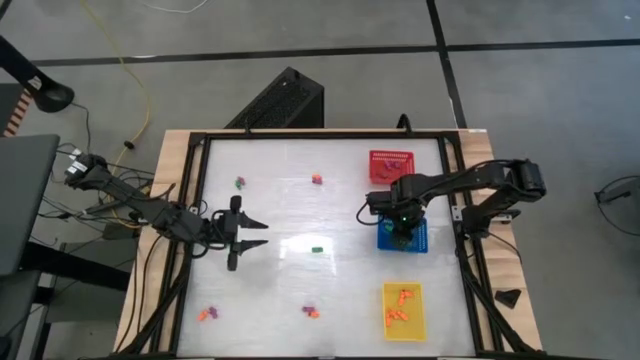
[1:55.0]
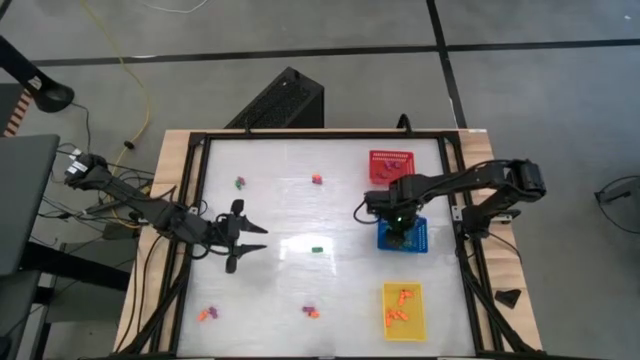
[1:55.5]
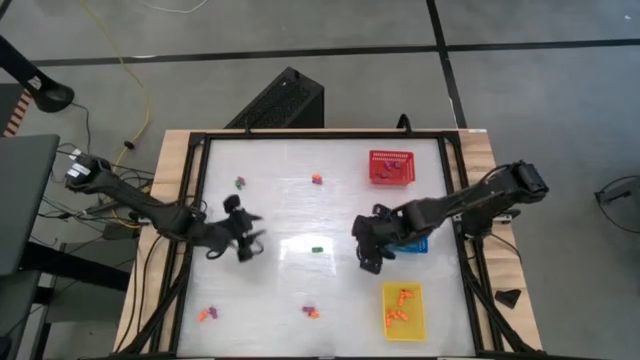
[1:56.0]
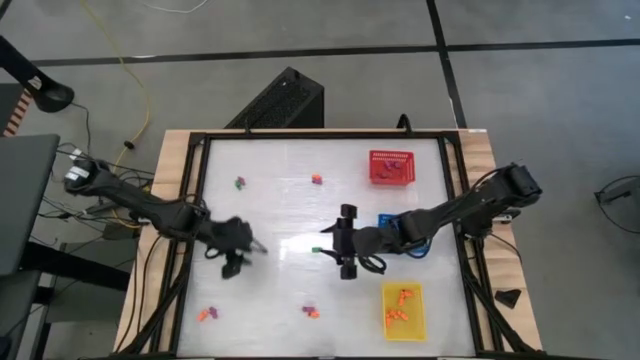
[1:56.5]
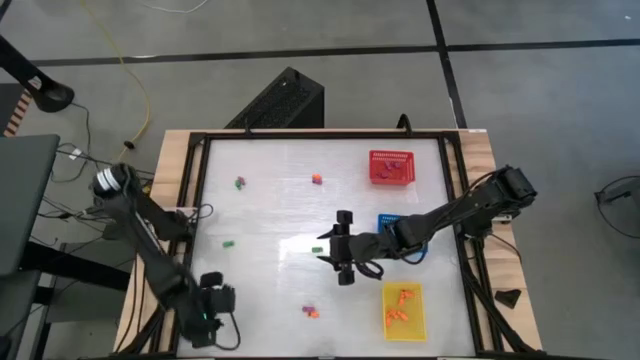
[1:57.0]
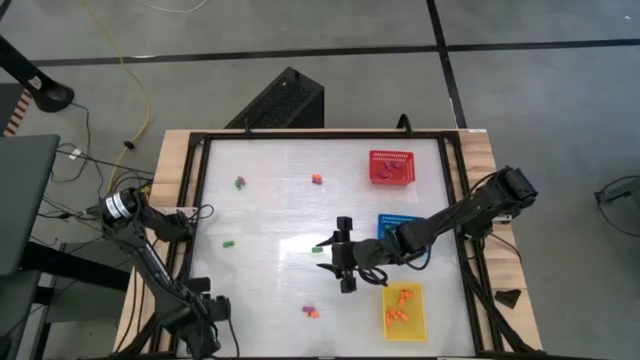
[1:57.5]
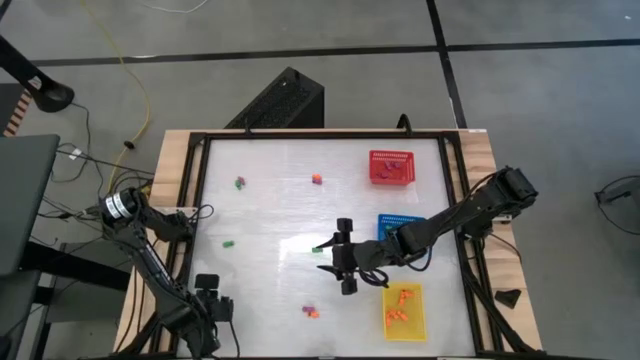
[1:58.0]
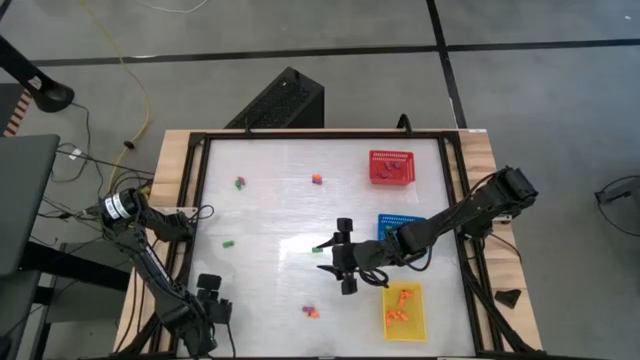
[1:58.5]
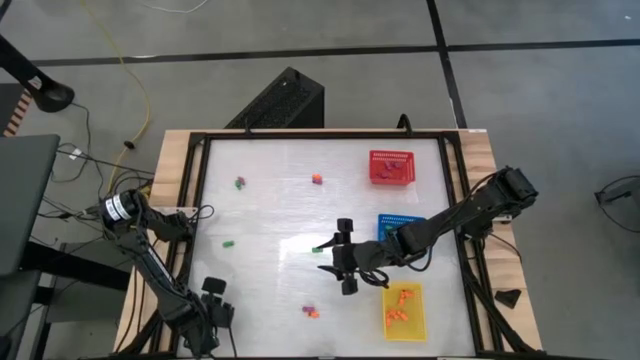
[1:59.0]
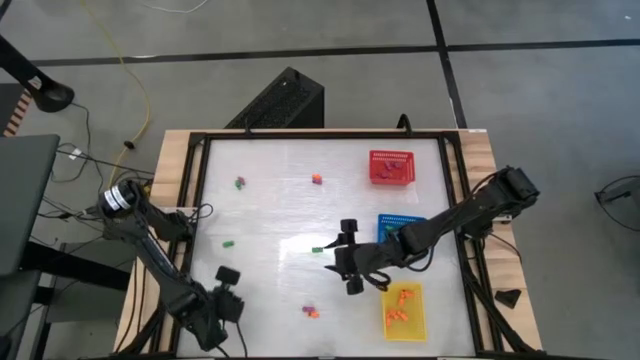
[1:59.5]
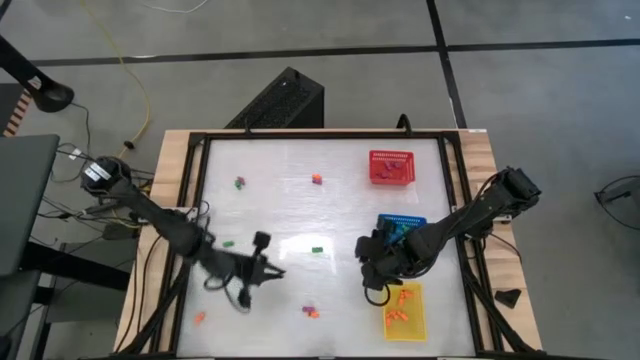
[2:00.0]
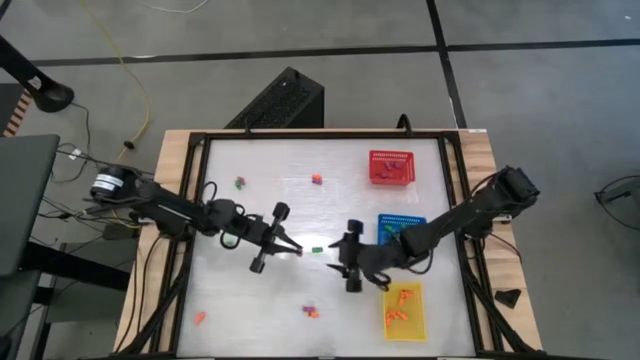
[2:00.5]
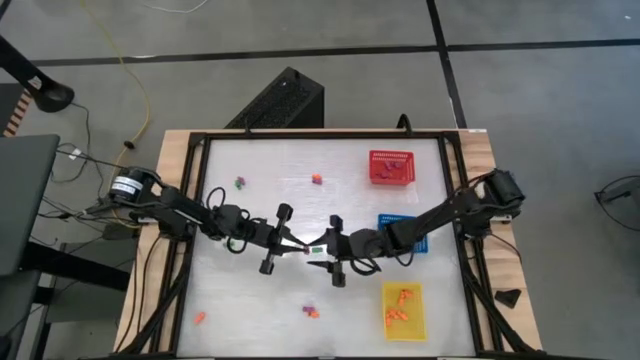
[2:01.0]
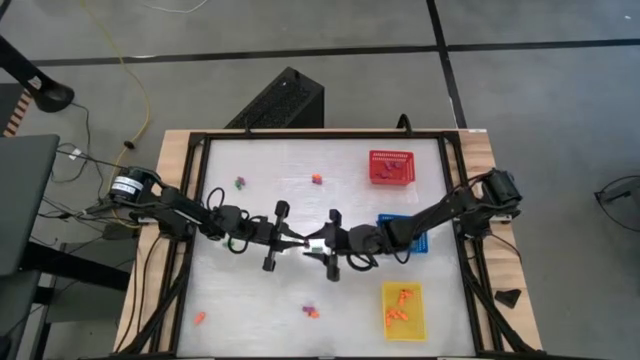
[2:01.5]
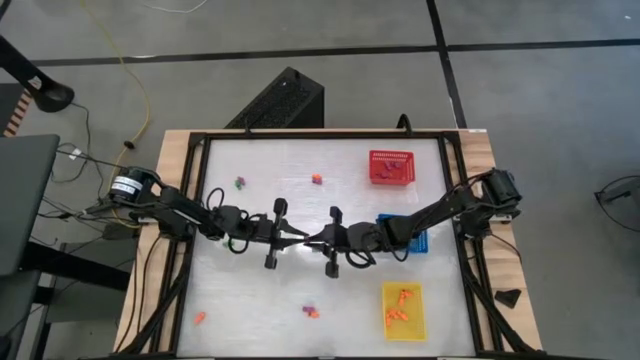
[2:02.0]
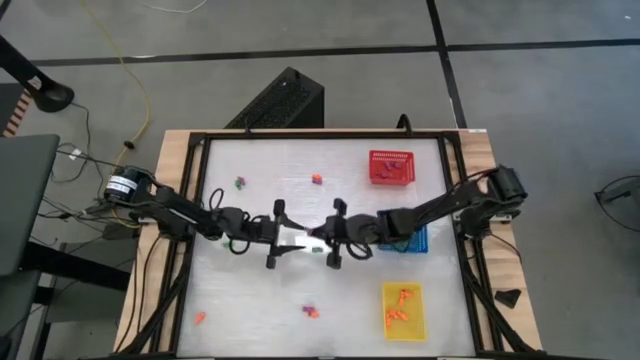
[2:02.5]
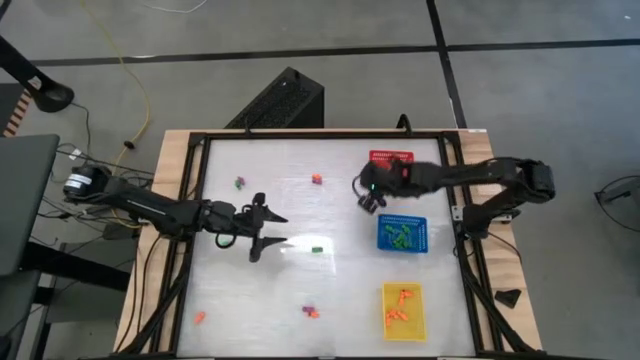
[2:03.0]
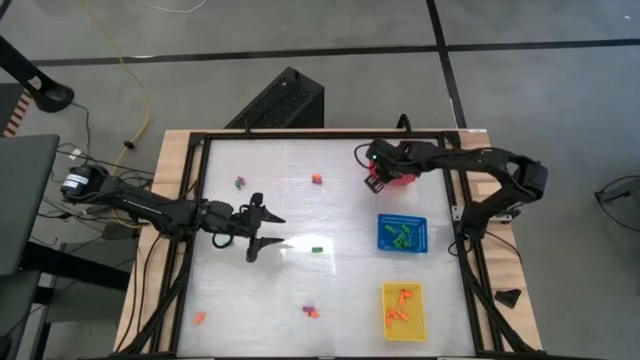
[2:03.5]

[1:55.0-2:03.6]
Task: Sort Halloween decoration
Put the violet skeleton toy into the red basket

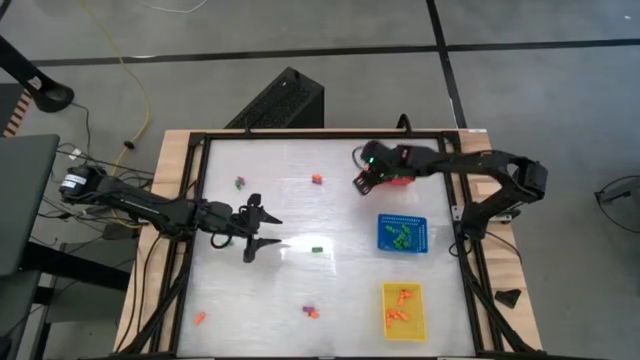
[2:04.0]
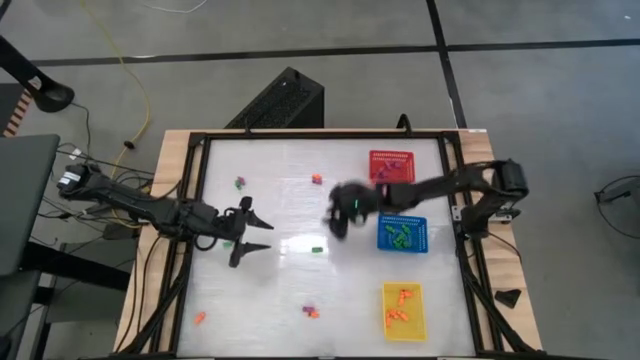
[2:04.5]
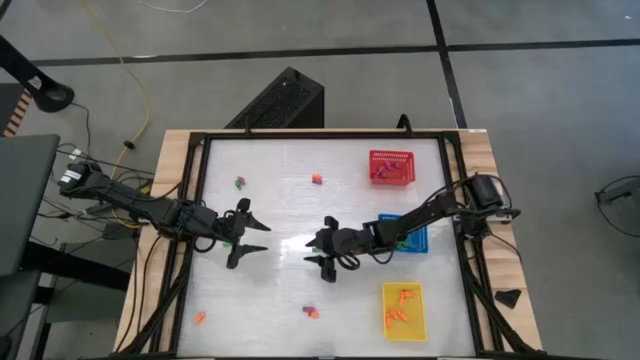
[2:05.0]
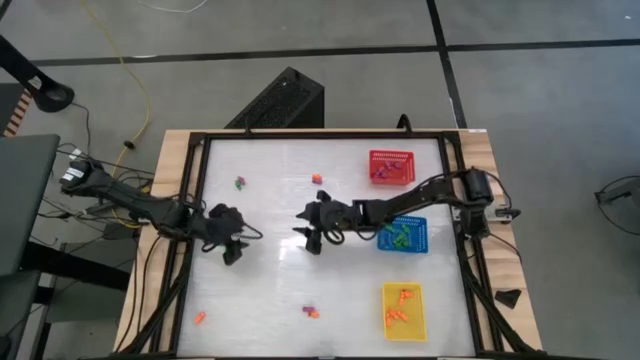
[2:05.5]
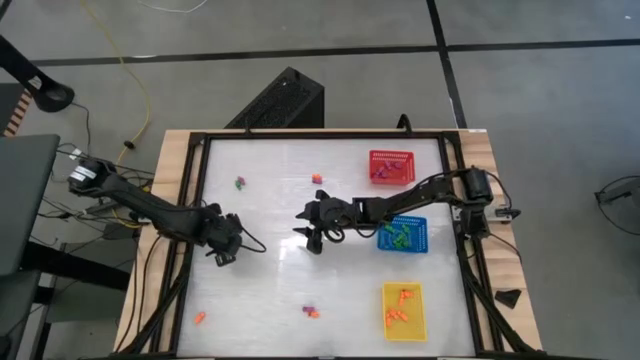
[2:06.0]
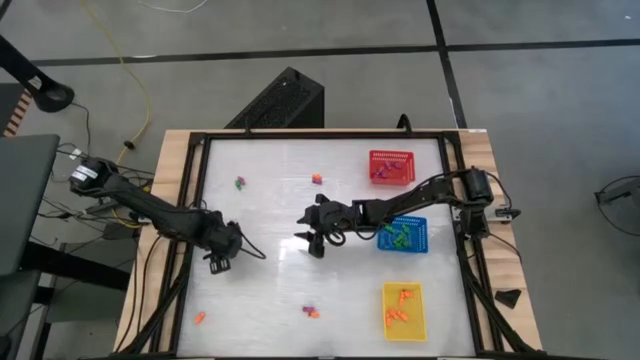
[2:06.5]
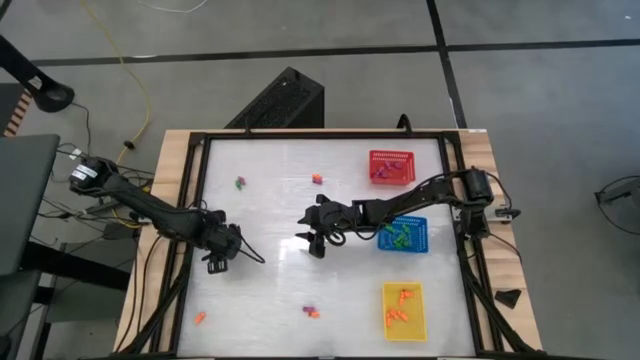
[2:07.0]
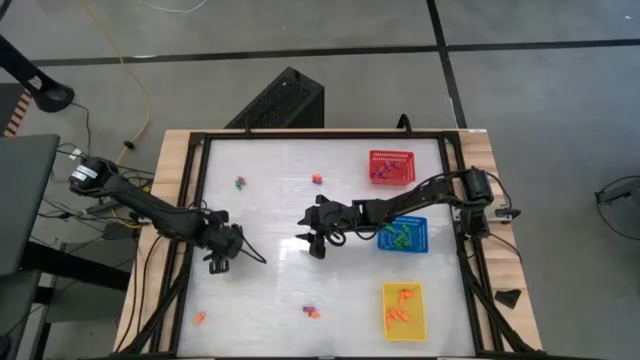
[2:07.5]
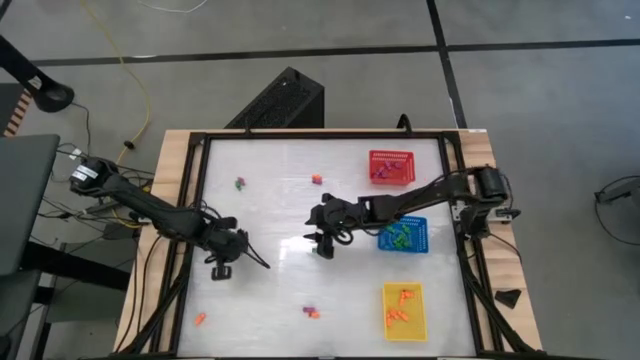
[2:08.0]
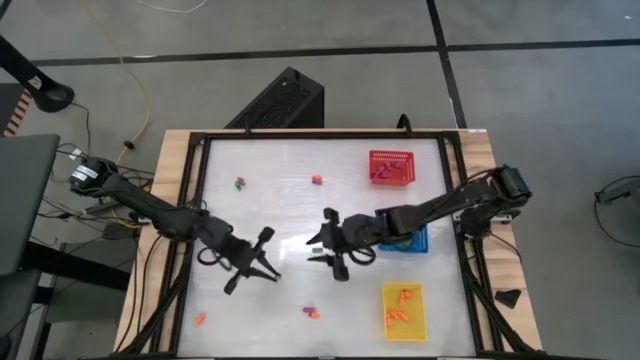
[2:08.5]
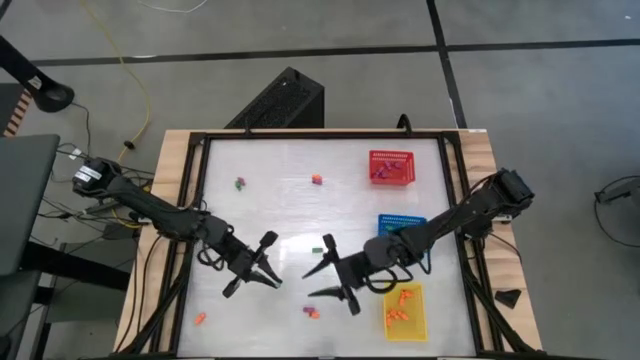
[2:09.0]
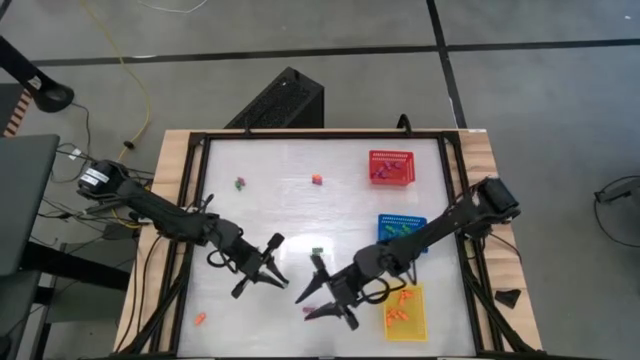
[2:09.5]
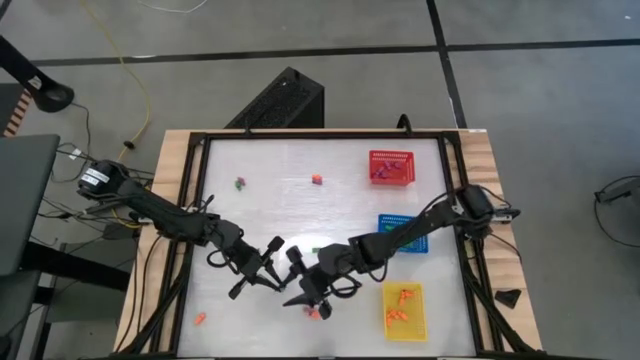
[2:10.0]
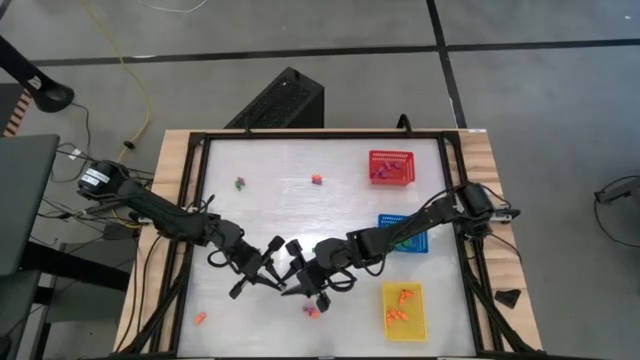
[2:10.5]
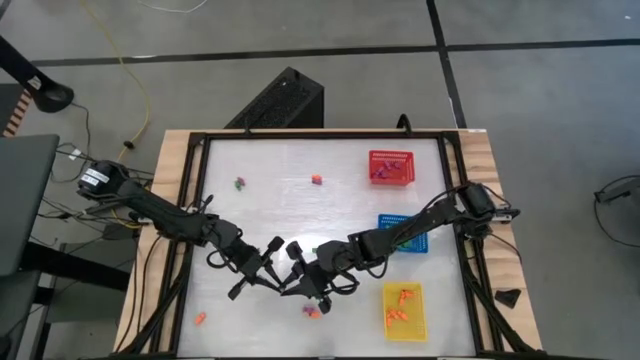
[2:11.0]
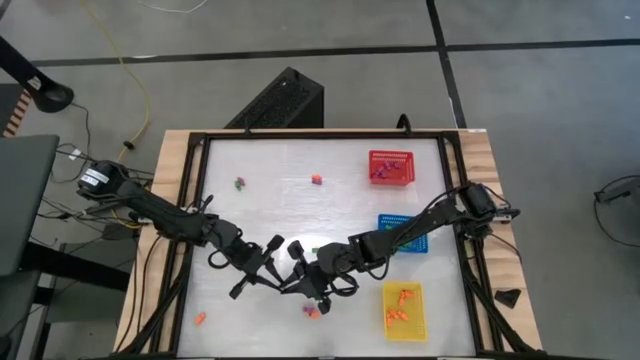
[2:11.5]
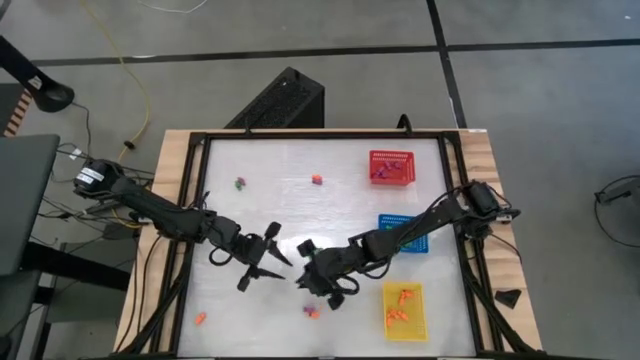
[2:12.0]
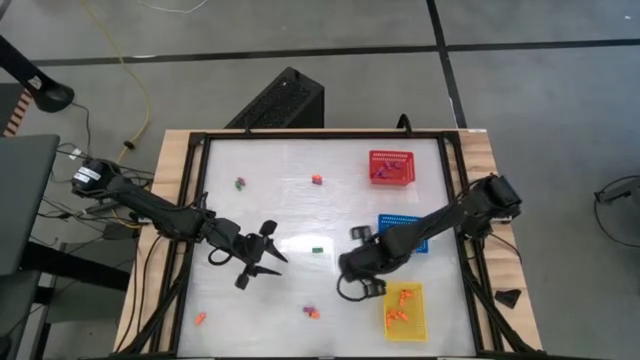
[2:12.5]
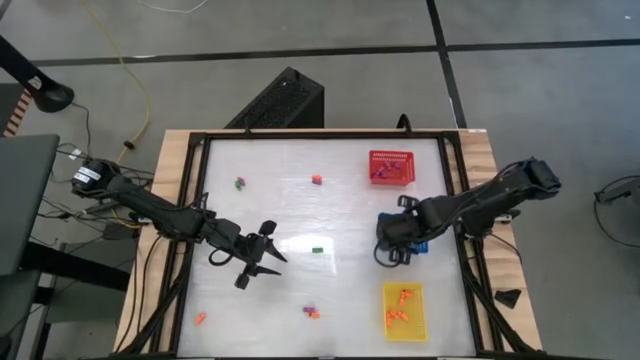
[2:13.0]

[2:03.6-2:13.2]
Put the green skeleton toy into the blue basket

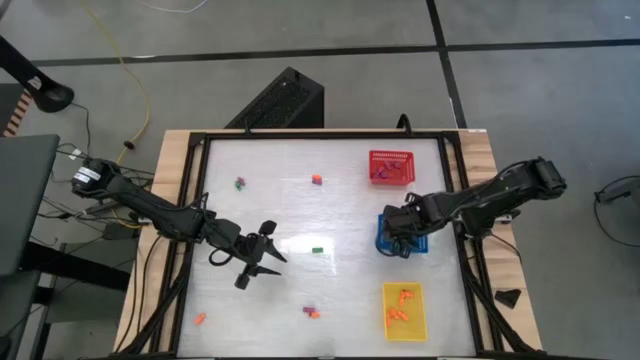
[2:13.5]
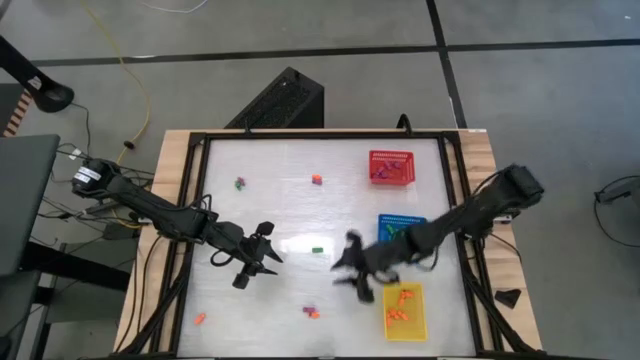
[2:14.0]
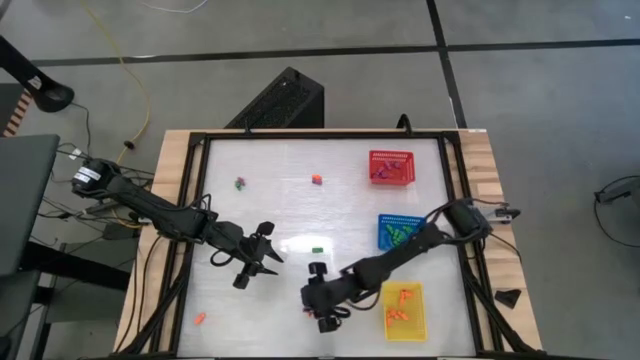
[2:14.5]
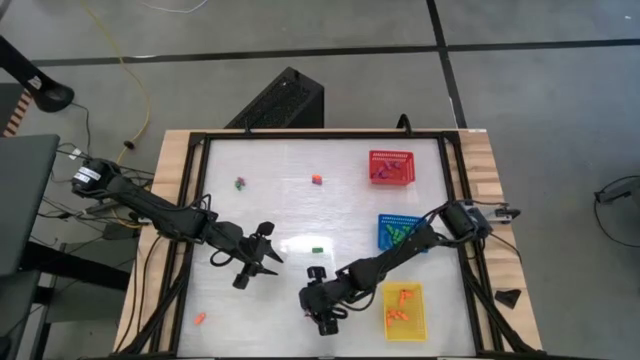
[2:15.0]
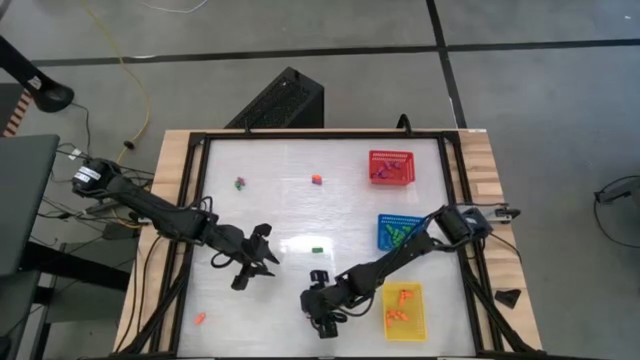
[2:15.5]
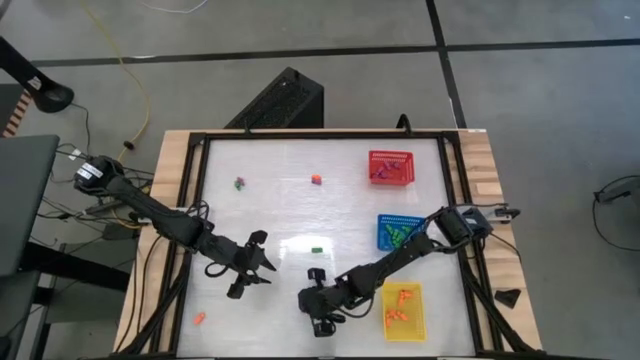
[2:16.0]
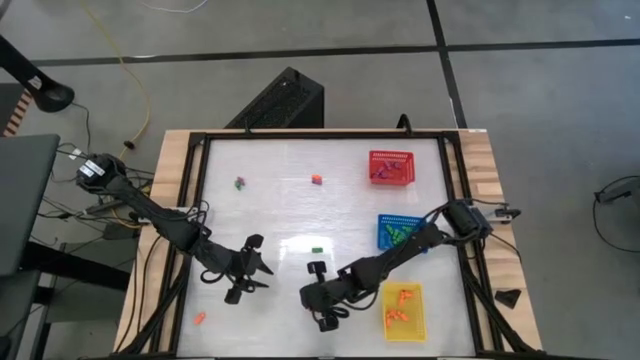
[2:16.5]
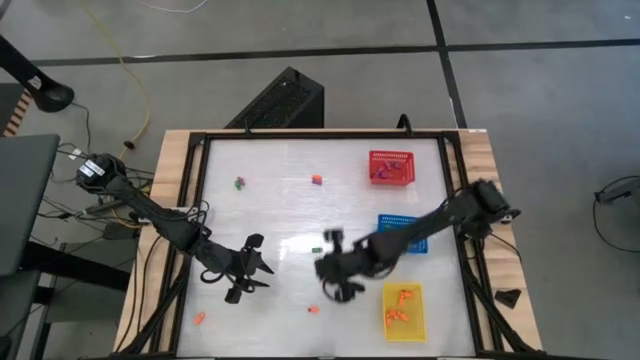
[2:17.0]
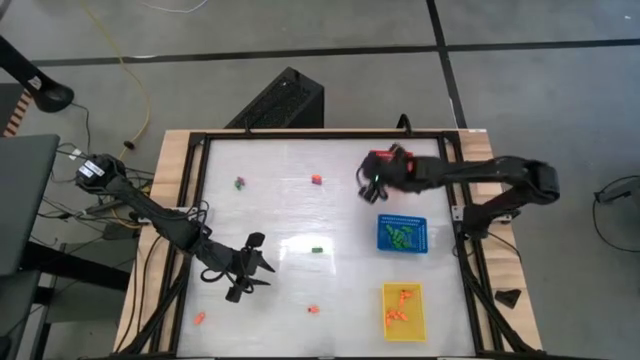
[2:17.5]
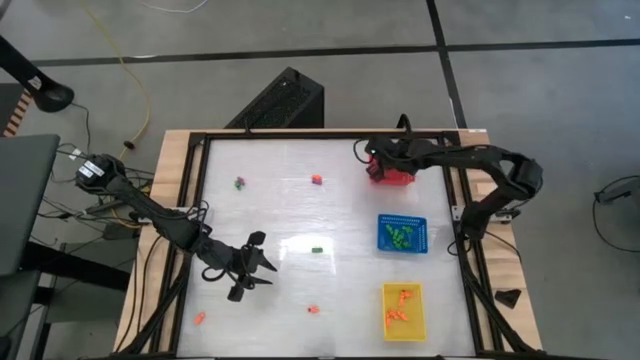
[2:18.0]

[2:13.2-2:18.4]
Put the violet skeleton toy into the red basket
